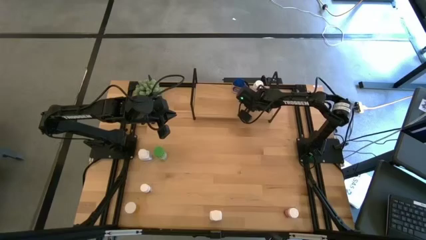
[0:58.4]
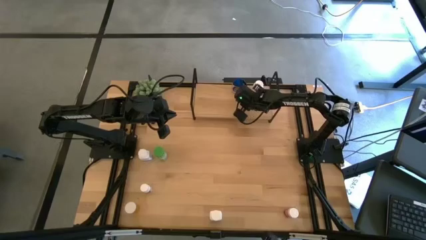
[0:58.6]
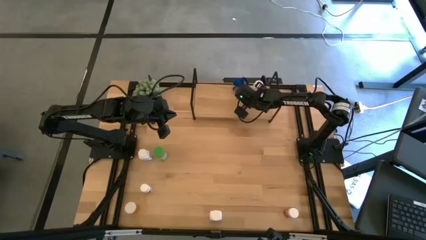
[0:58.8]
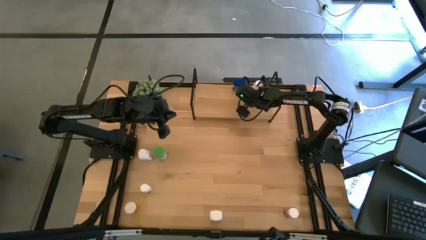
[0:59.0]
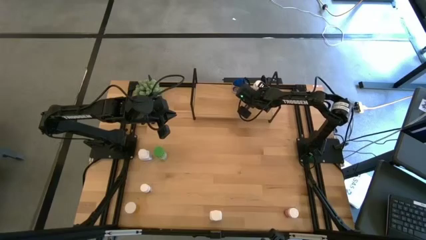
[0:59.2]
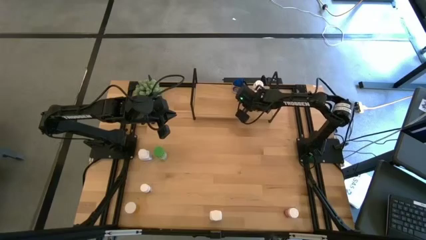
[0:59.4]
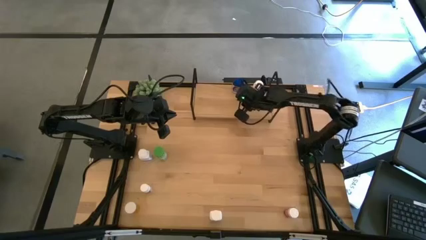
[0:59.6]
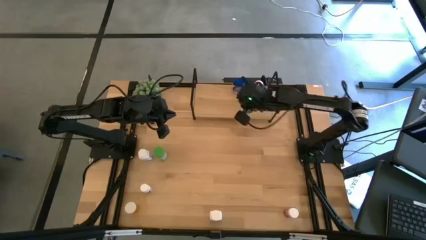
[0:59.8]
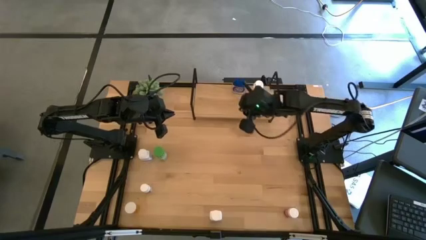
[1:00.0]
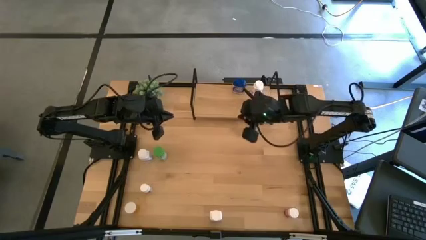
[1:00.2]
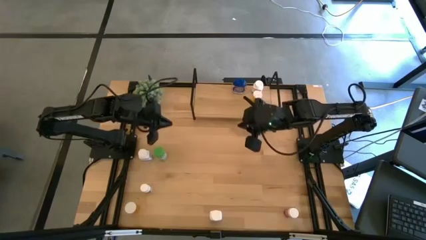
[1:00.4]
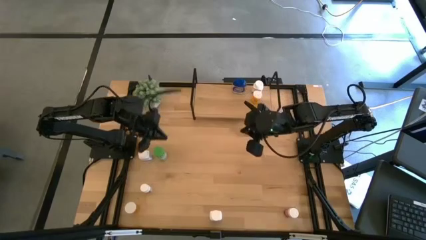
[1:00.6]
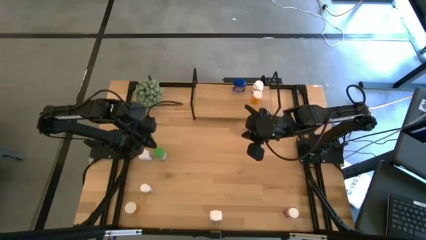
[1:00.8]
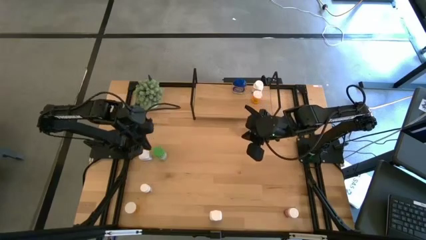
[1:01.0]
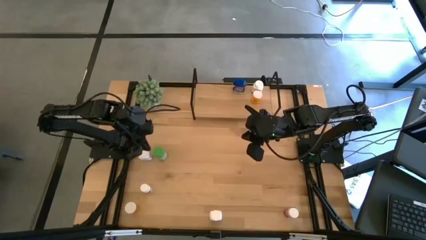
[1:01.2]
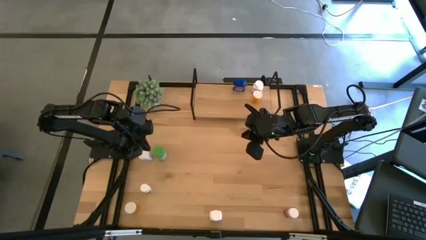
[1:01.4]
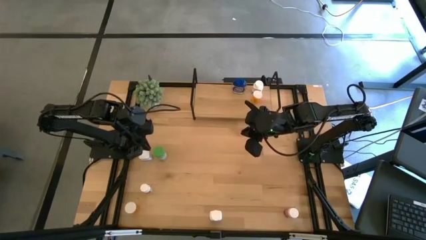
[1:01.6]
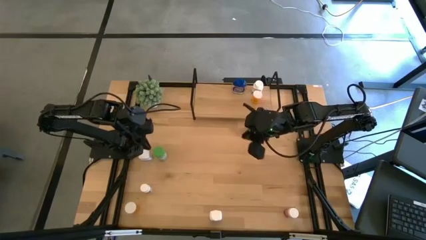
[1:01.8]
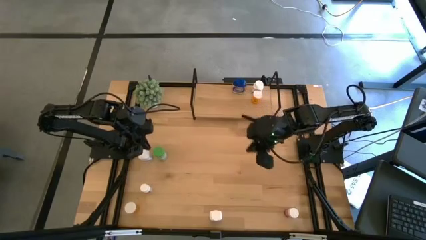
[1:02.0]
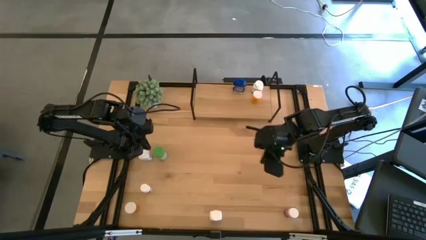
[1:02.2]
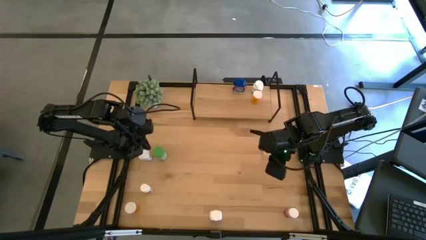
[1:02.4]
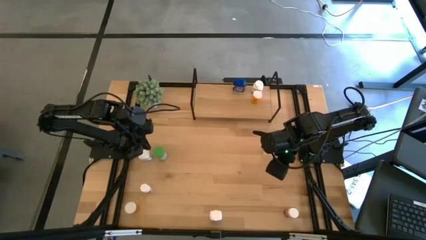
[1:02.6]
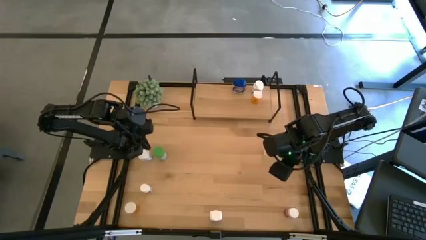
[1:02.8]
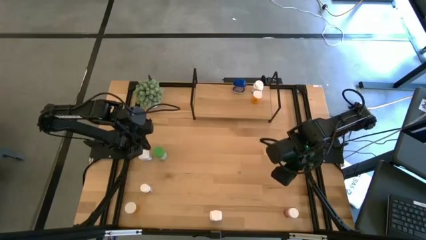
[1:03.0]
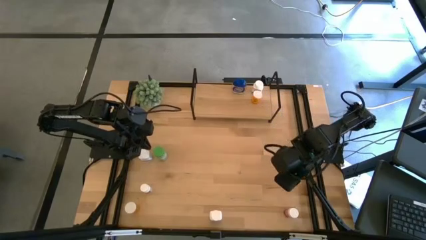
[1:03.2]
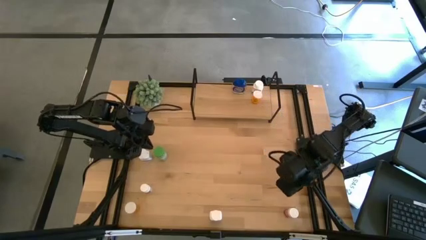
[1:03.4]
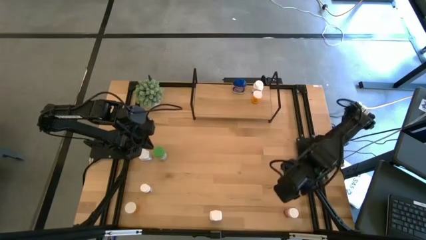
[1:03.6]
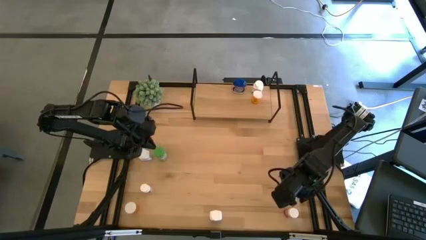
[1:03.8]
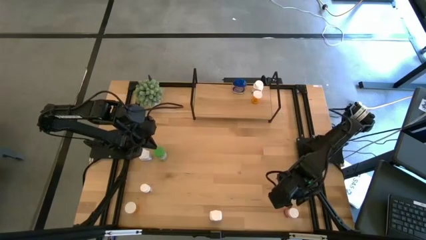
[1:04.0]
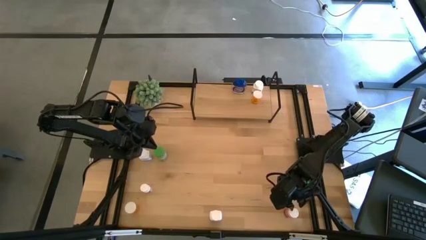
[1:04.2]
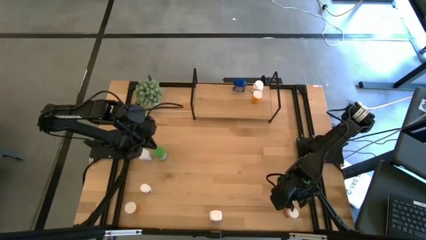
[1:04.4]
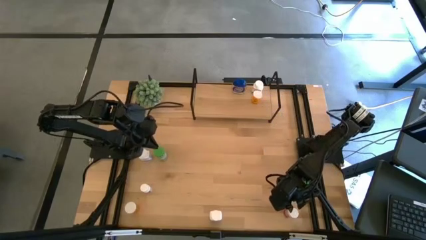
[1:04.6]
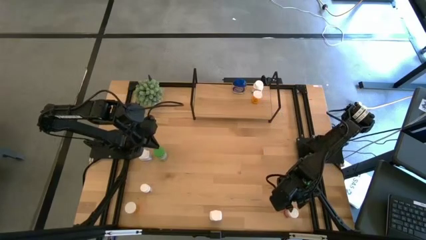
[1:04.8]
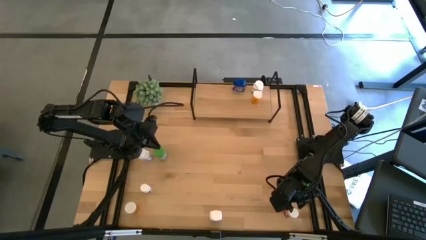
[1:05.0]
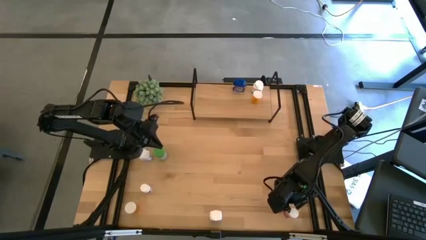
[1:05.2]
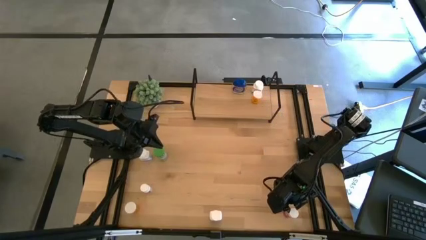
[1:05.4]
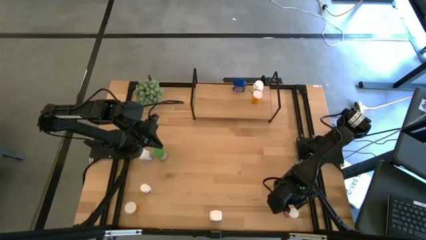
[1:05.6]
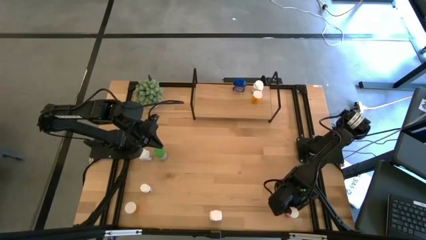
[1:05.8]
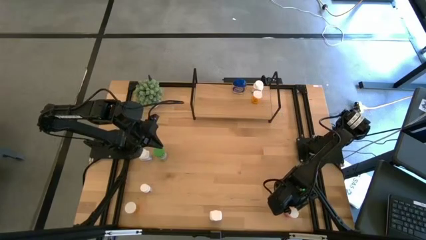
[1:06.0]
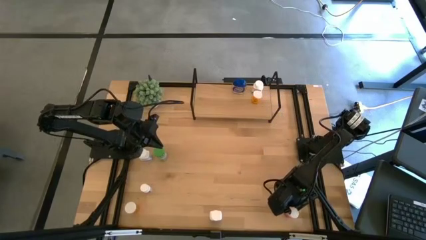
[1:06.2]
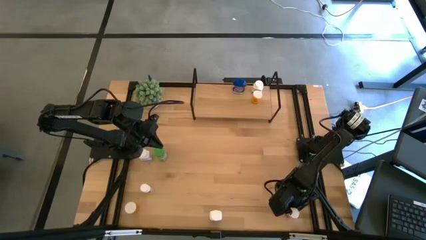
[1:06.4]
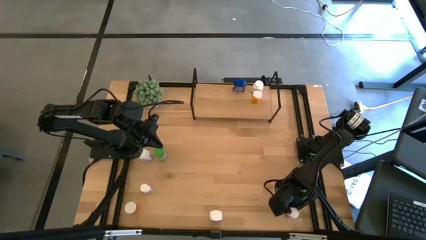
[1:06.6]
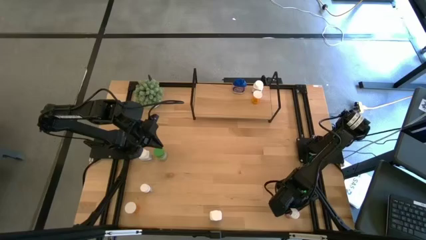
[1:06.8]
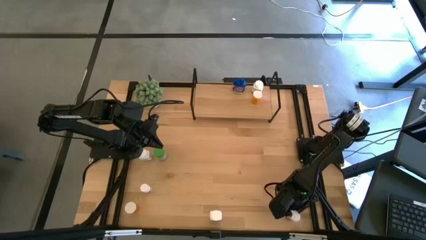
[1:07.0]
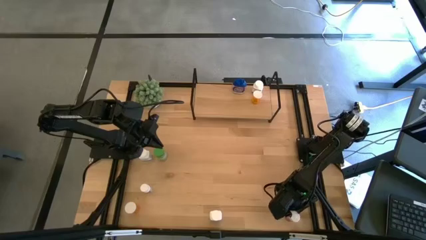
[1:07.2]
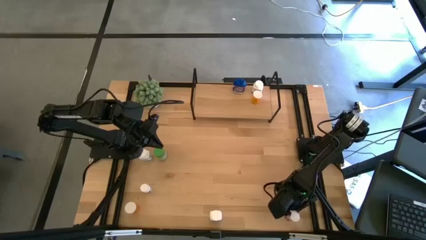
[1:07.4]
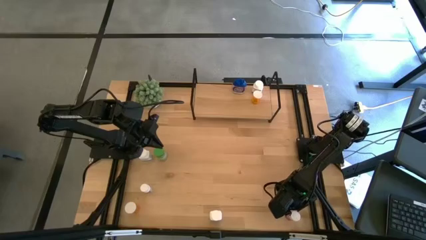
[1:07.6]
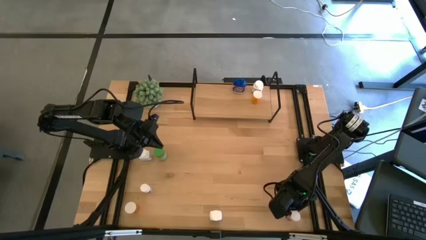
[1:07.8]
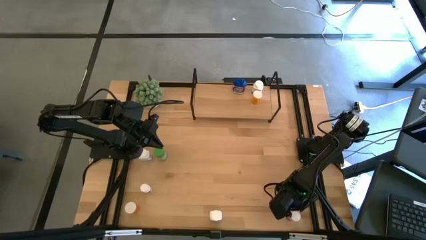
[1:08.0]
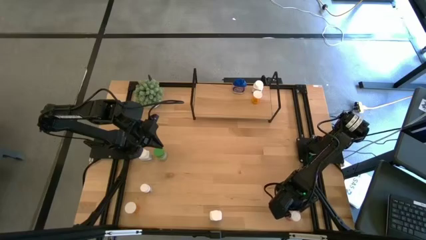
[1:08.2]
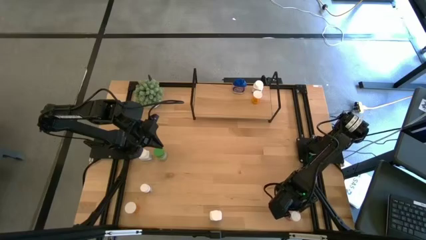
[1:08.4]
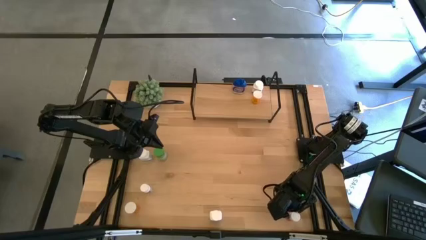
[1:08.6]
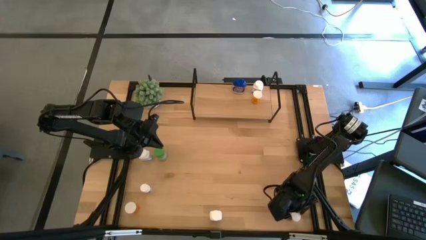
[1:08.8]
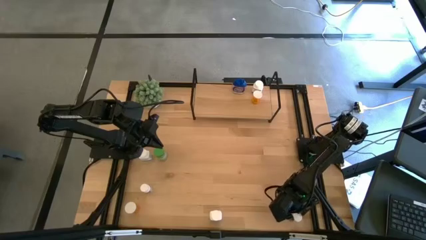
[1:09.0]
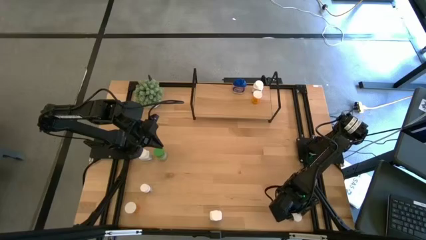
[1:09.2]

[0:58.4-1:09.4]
Task: Pick and place medicine bottles onto shelf by color
Put the pink pill bottle on the shelf
